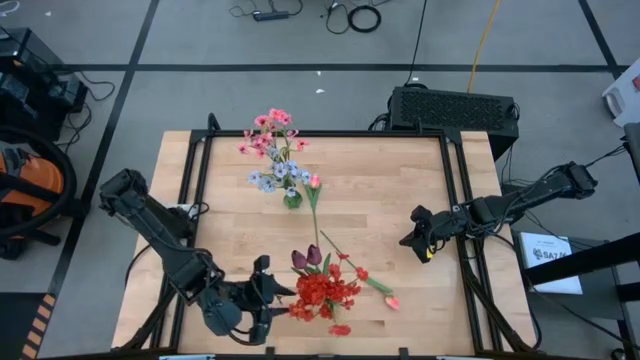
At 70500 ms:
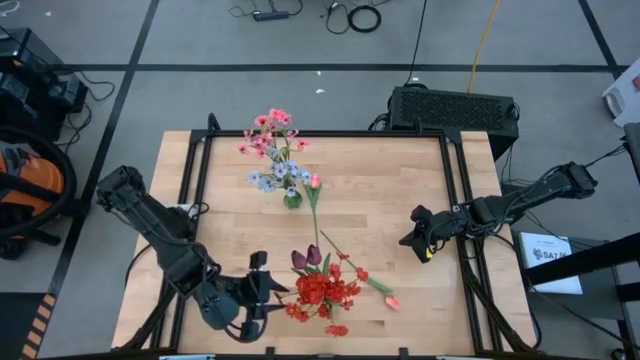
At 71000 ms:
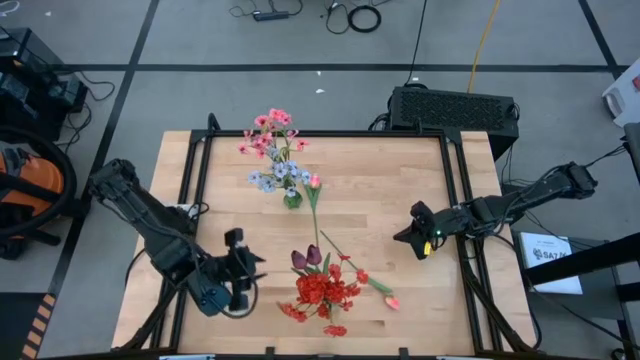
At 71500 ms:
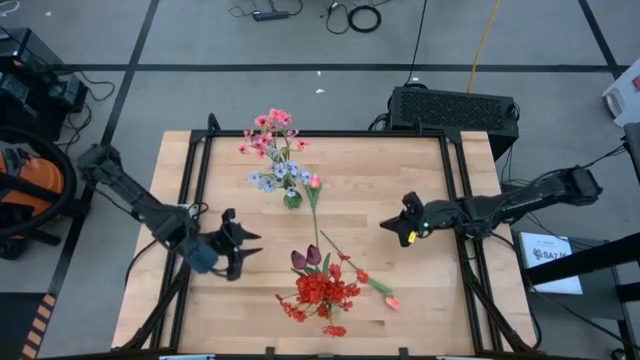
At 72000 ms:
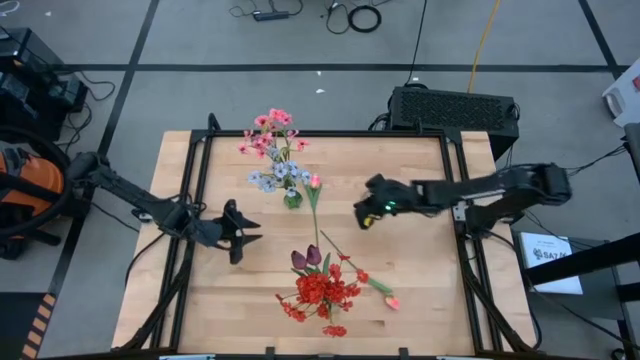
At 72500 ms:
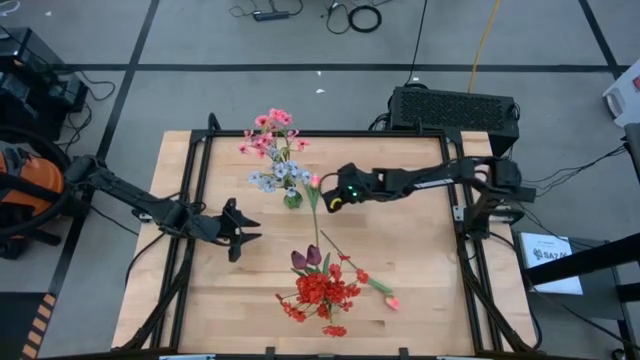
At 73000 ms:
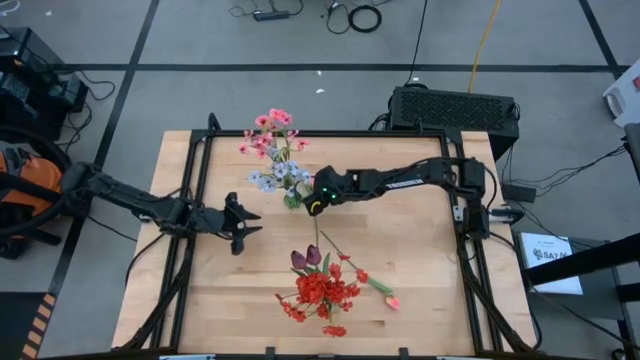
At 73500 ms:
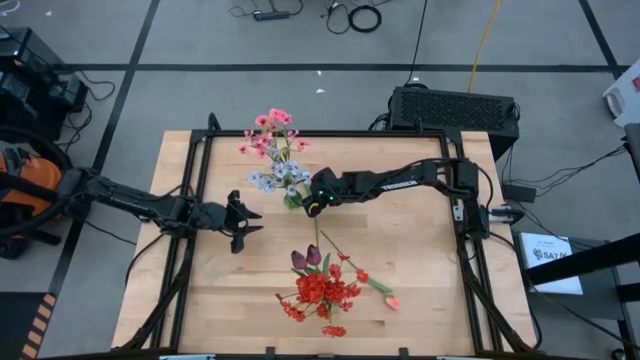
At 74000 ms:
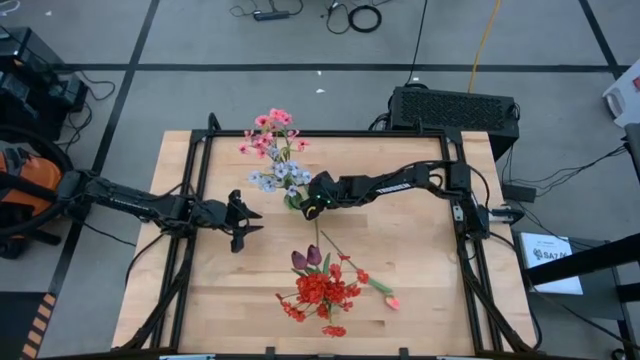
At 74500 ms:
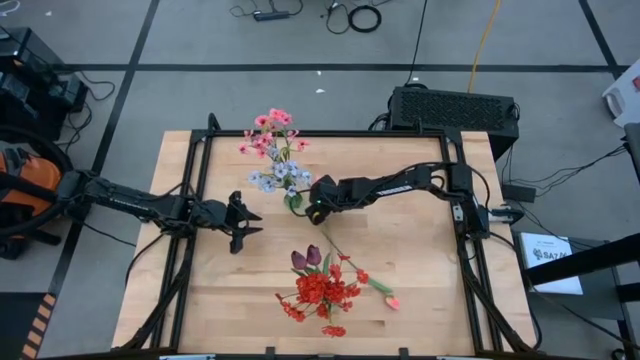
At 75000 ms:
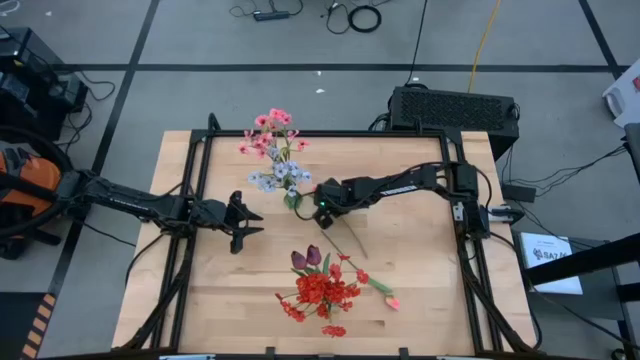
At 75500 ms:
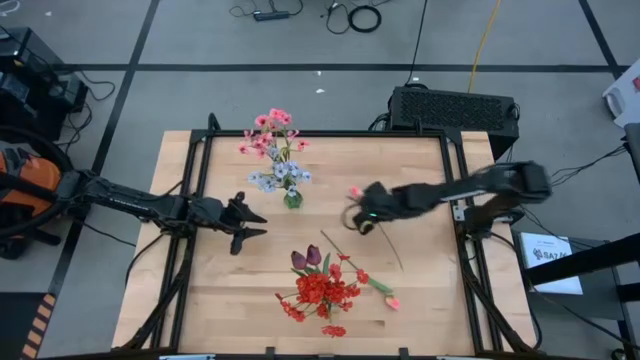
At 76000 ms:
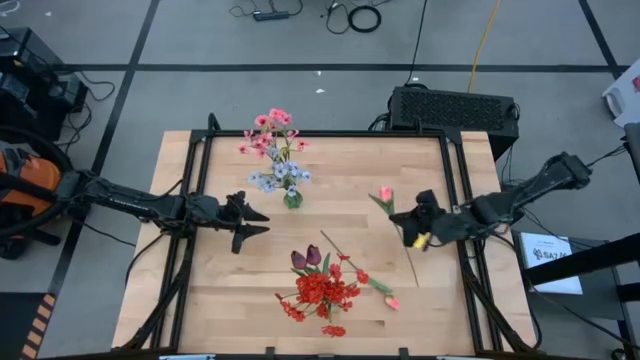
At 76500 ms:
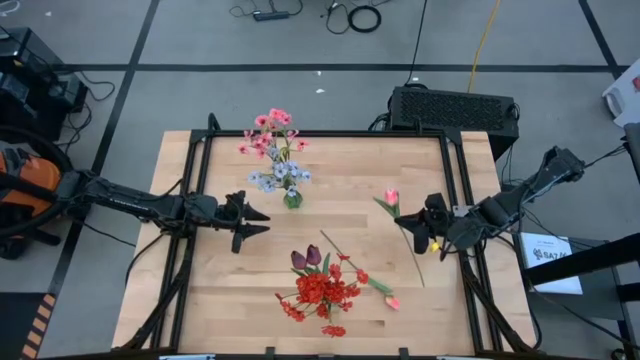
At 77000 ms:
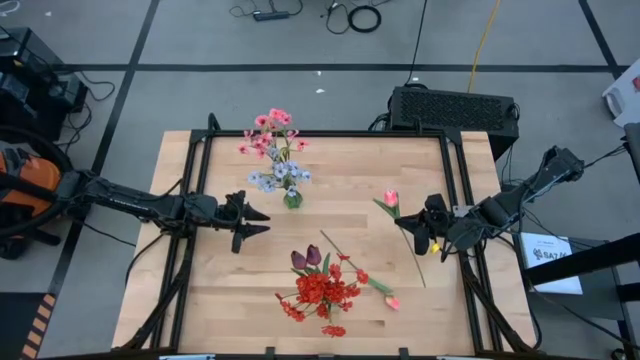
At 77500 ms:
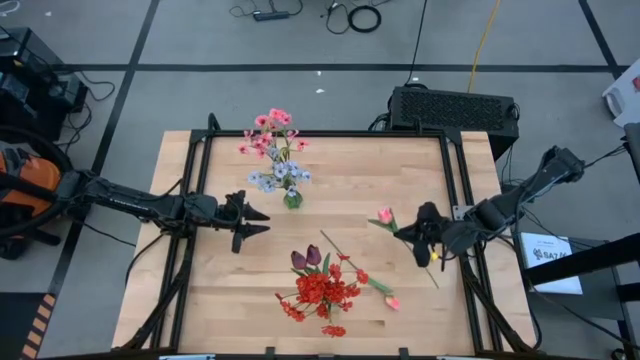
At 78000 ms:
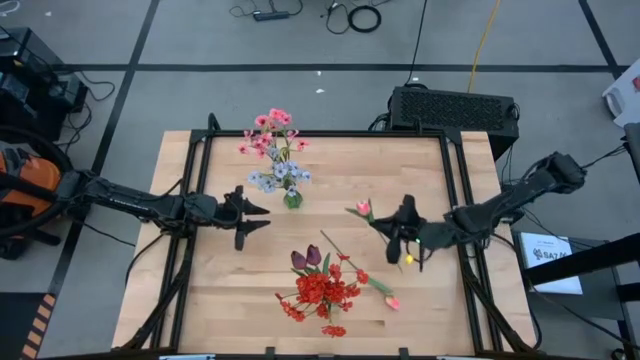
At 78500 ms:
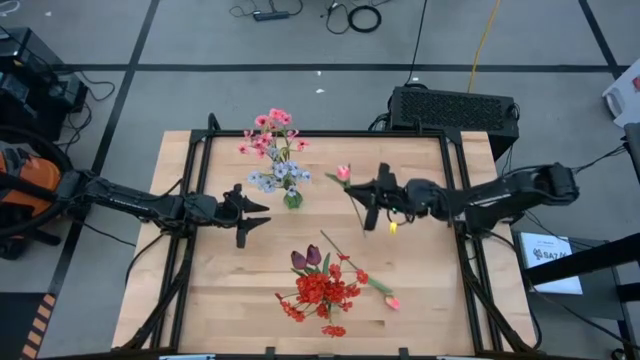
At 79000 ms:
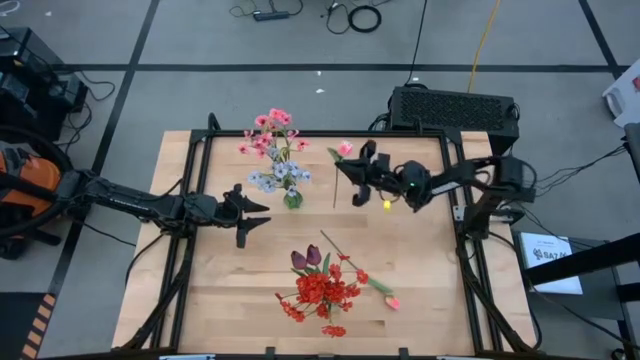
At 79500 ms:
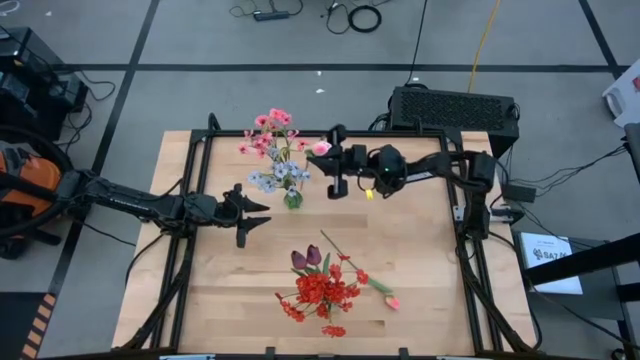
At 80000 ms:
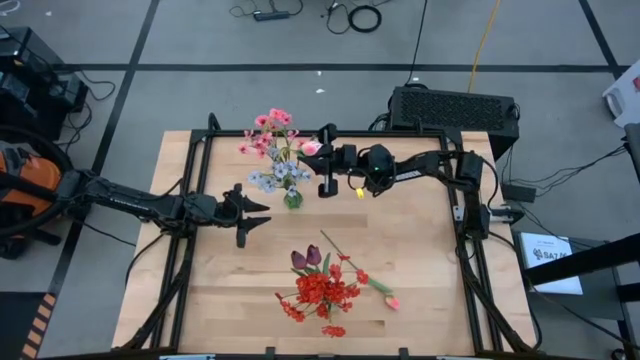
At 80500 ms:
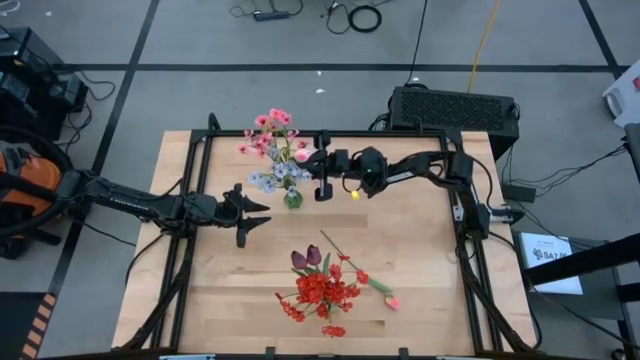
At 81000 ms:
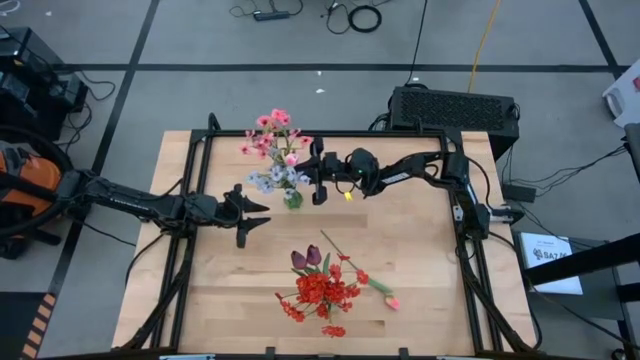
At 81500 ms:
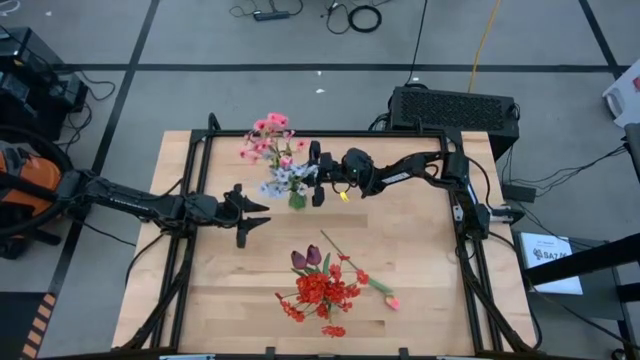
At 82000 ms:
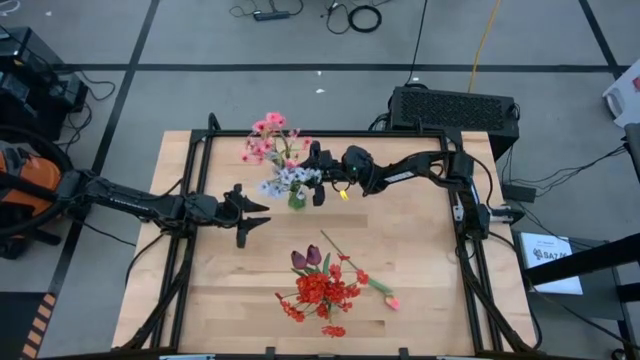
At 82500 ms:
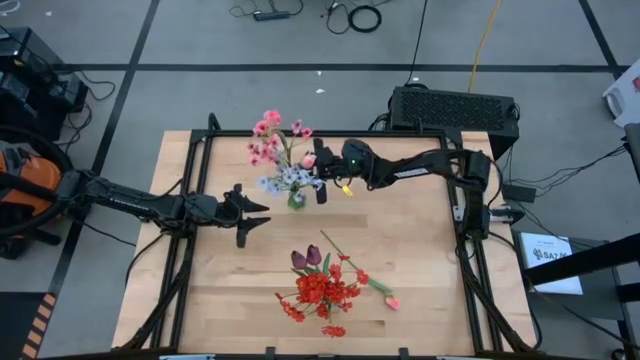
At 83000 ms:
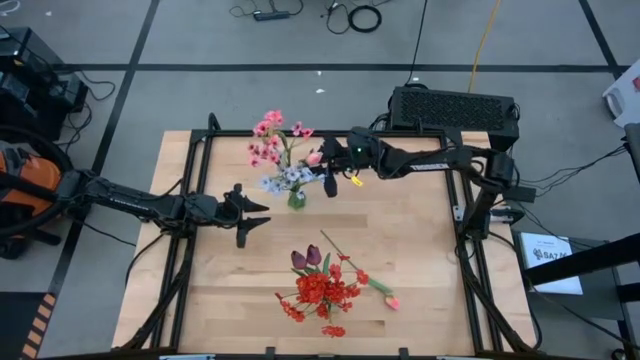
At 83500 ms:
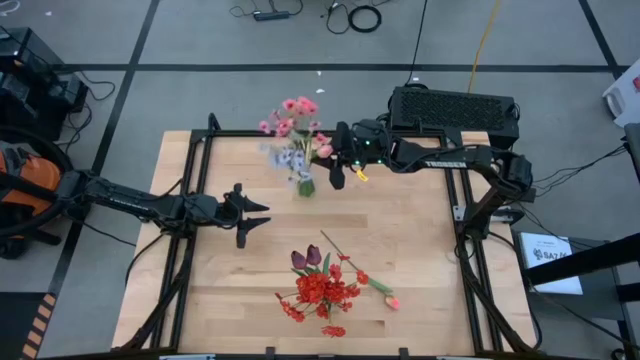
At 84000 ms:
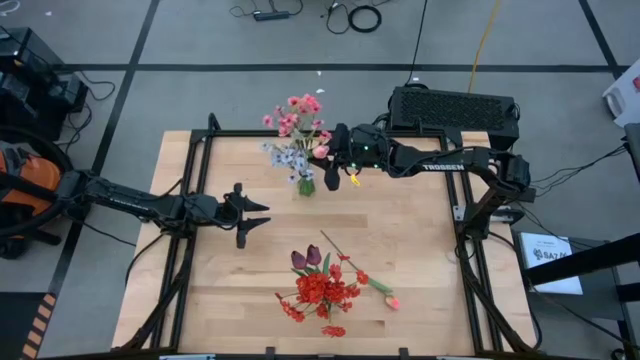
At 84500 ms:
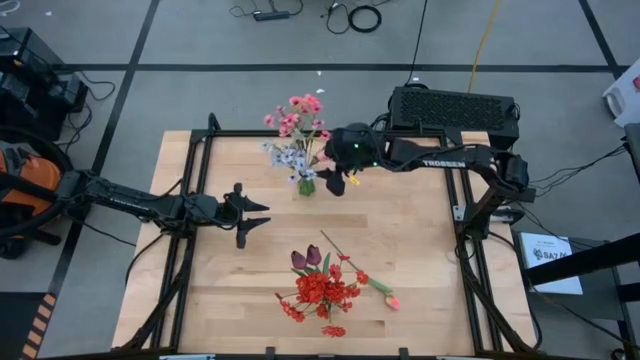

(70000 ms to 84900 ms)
Task: Sort flowers into vase by color
Put the top pink tulip into the green vase

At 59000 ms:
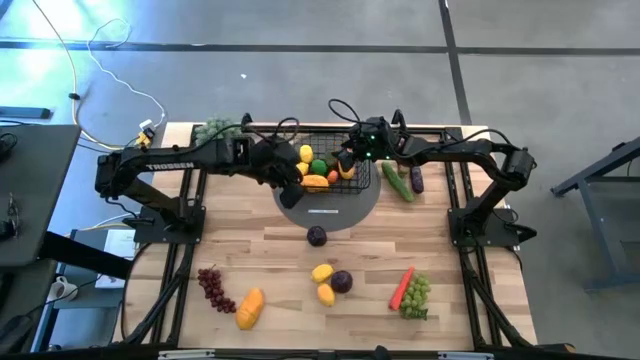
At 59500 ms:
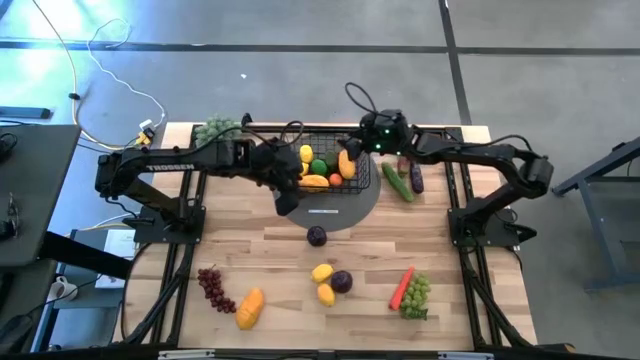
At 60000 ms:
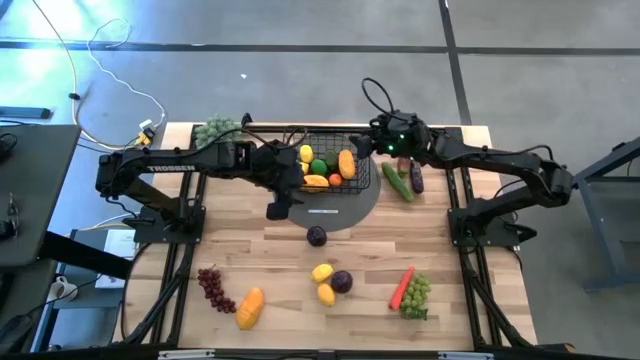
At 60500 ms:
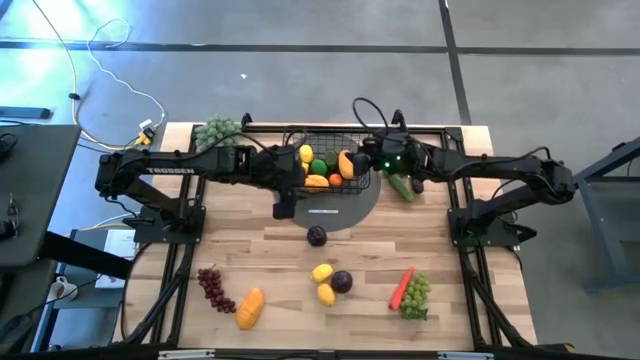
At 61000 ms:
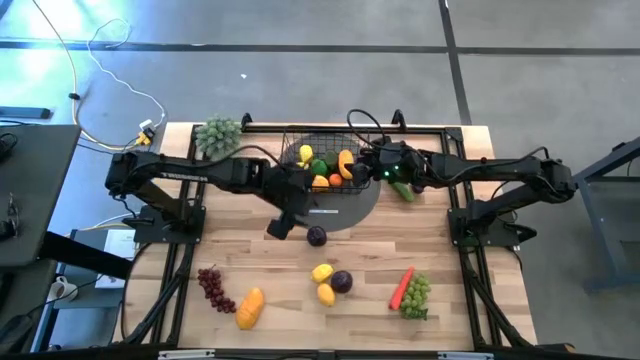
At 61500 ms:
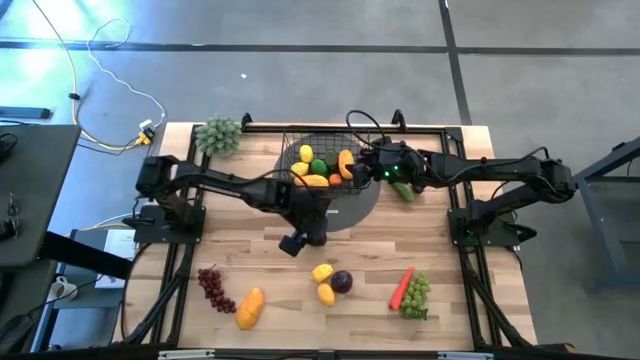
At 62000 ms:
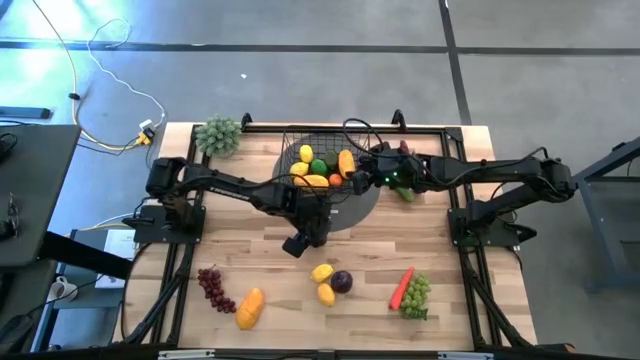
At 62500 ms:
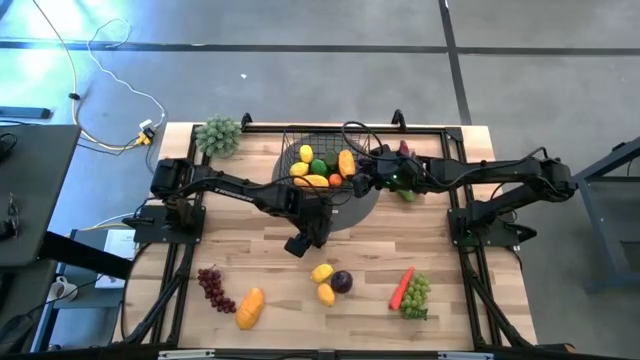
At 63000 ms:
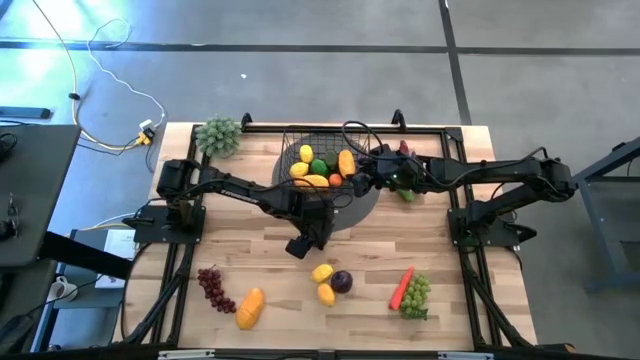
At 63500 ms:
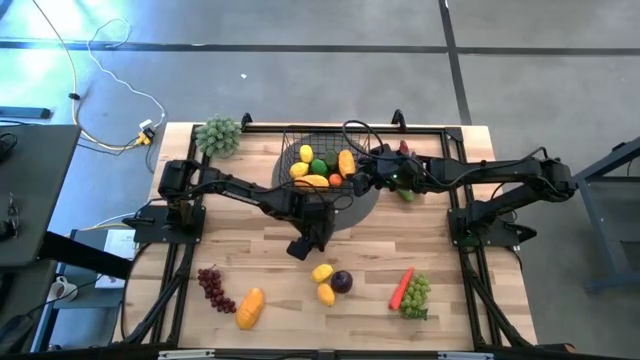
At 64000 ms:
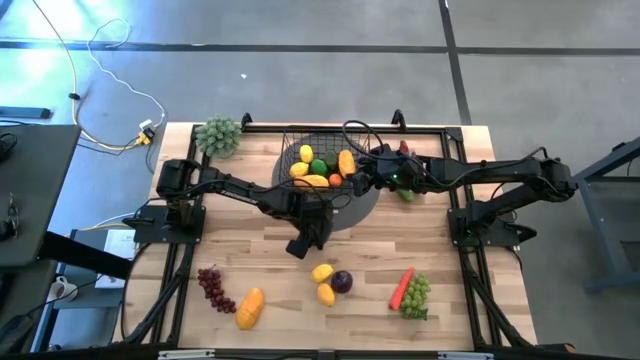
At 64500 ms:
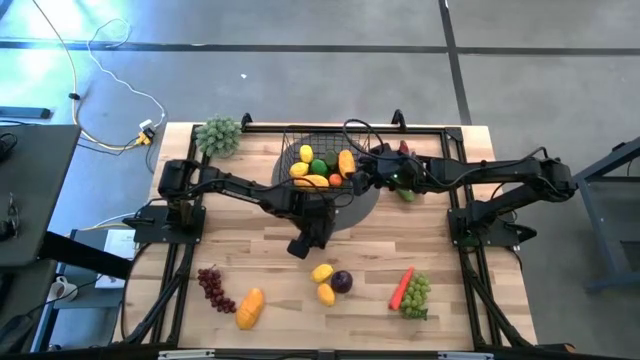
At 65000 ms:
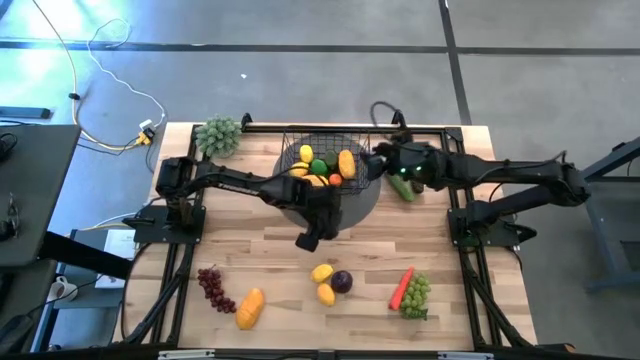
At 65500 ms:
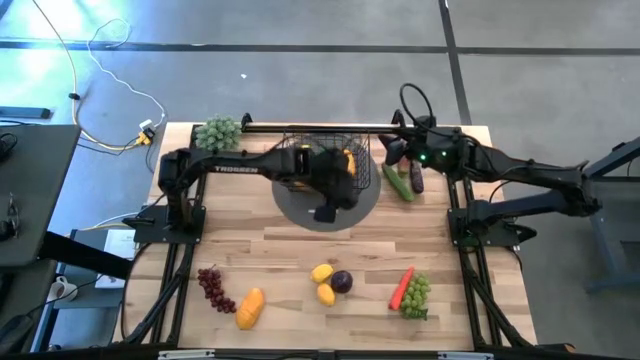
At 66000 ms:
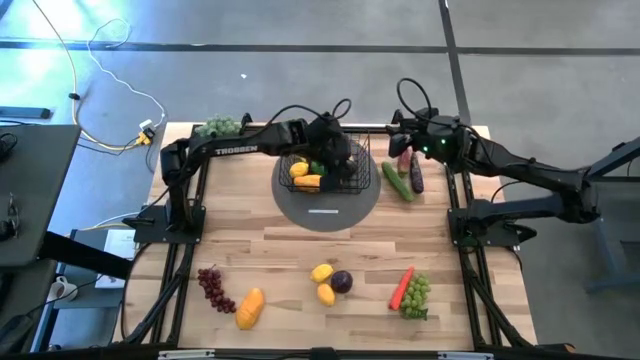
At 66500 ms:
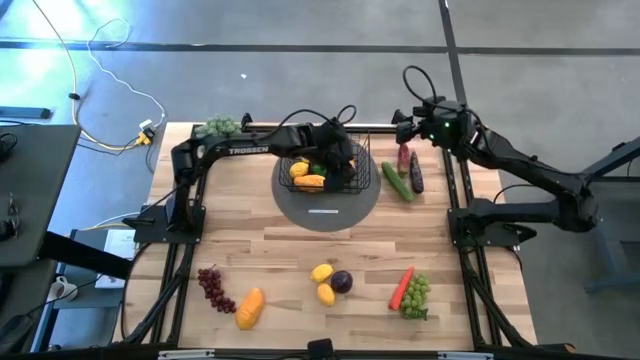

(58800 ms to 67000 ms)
Task: Build produce basket
Put the purple avocado into the wire basket
